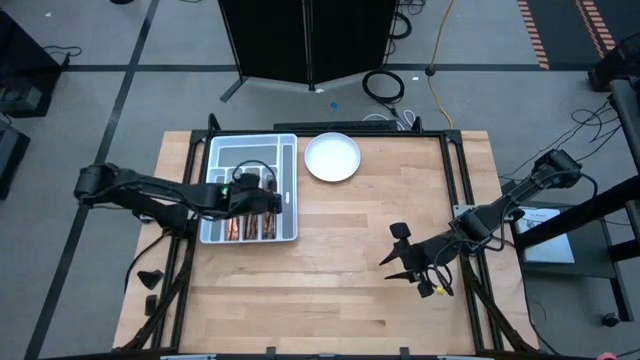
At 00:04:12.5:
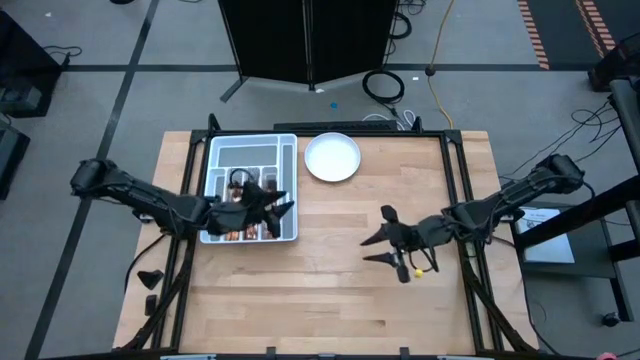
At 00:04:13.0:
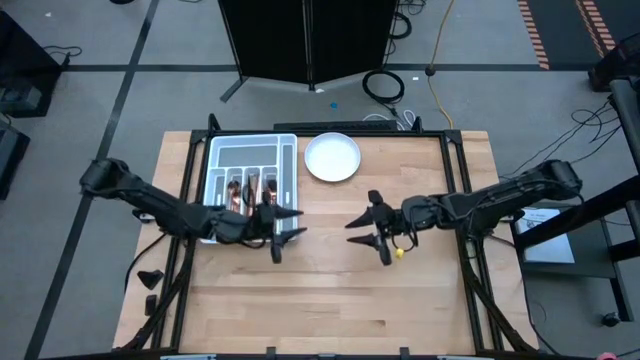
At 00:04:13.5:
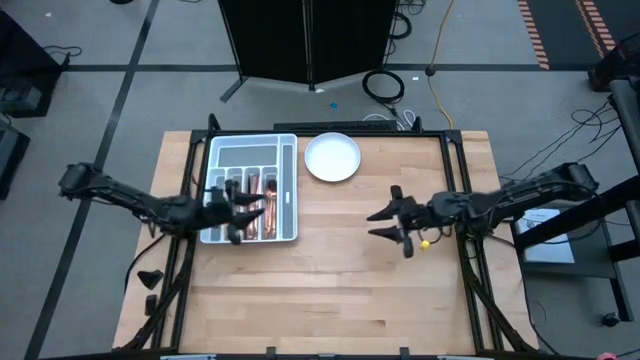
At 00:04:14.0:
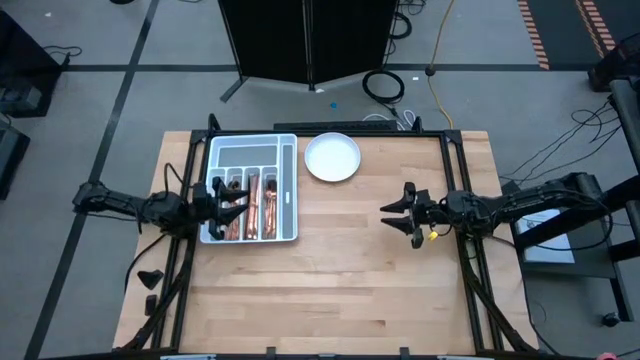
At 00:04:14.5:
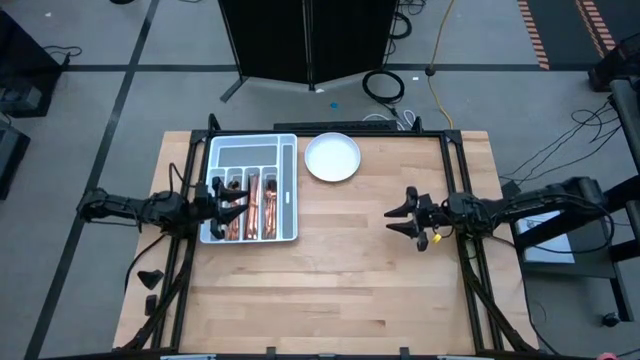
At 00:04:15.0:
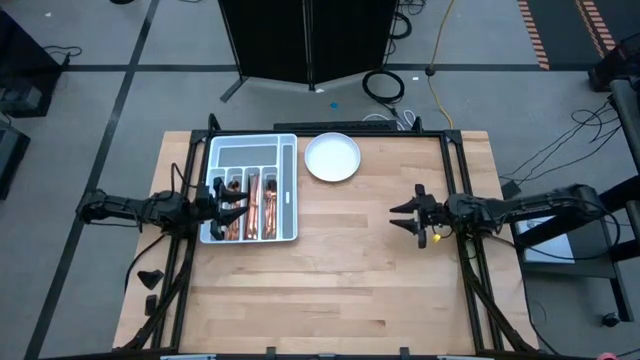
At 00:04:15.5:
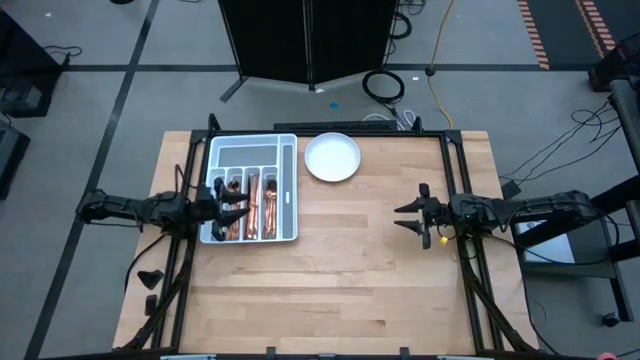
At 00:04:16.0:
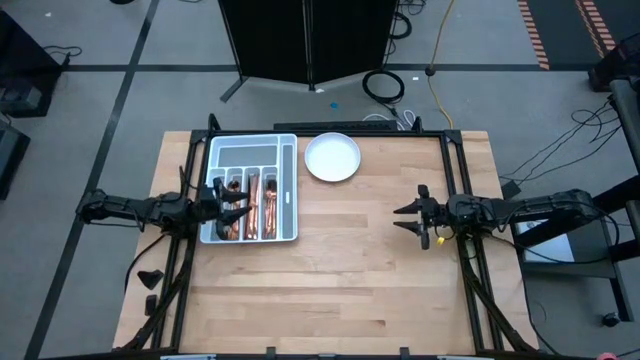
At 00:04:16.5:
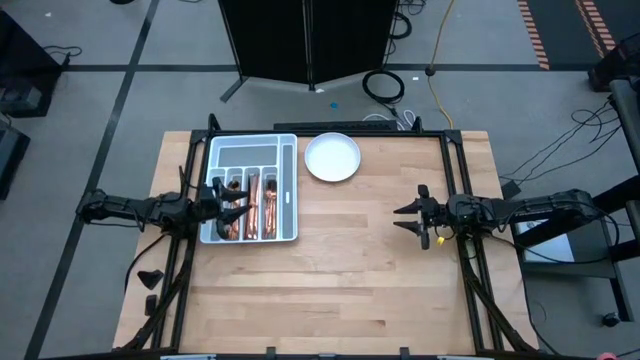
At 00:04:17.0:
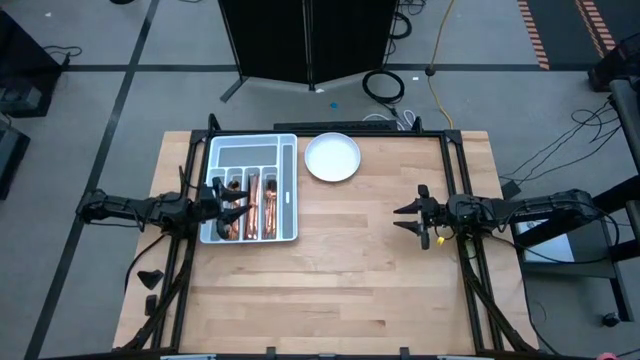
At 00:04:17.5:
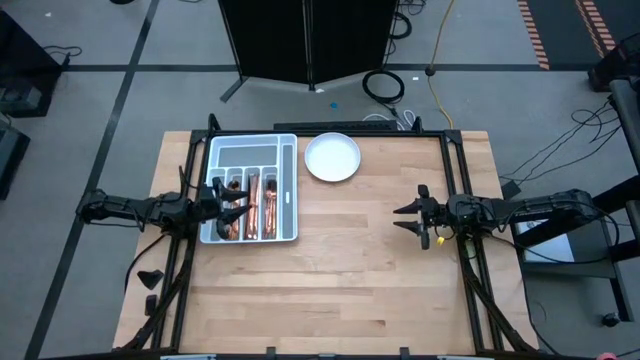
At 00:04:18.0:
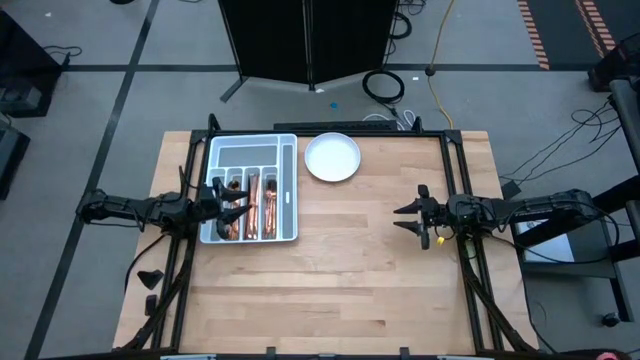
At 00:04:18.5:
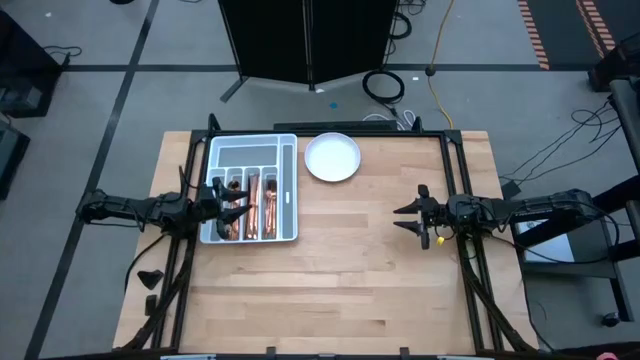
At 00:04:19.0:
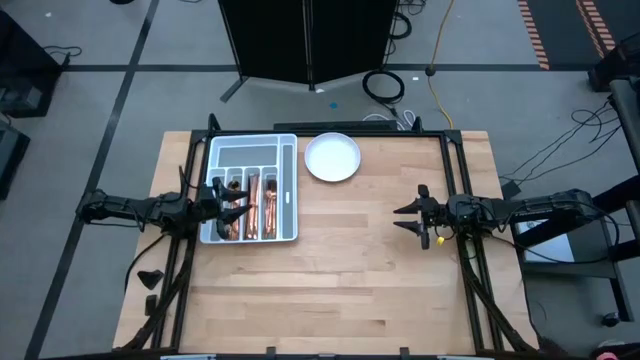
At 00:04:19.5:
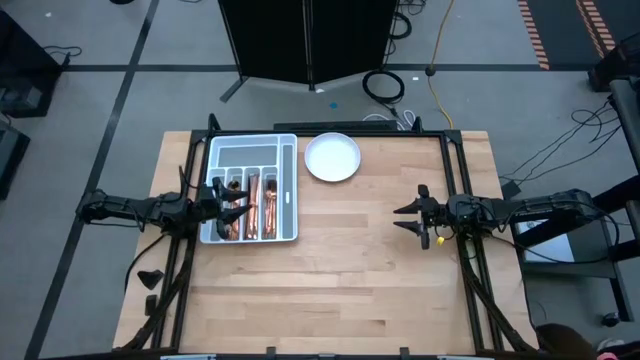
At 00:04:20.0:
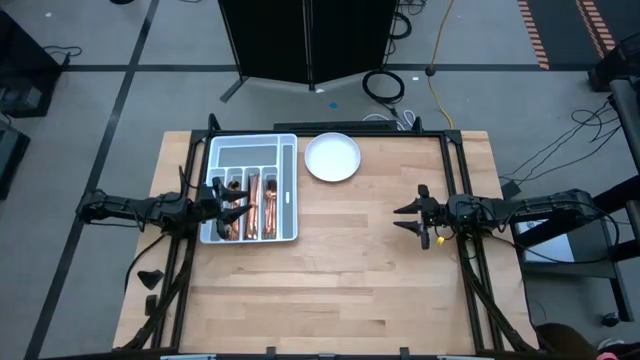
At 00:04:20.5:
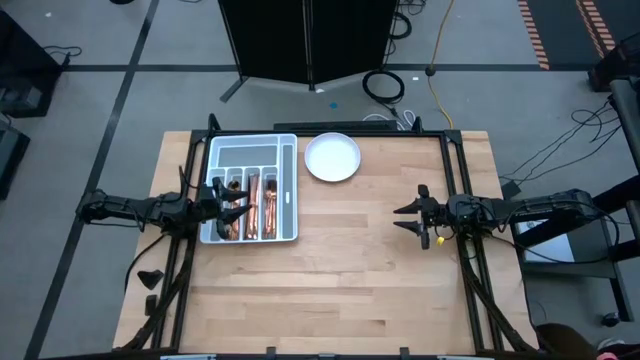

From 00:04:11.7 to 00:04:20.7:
Task: Sort silverware
Return to Home Position

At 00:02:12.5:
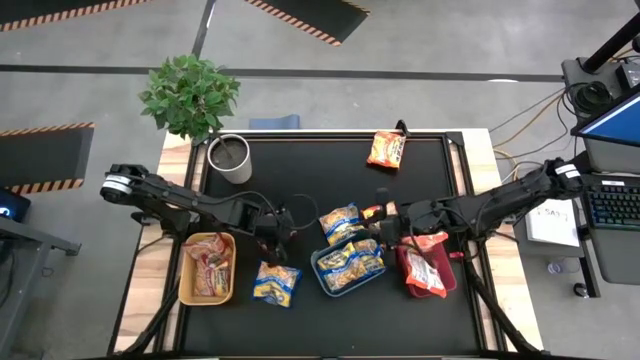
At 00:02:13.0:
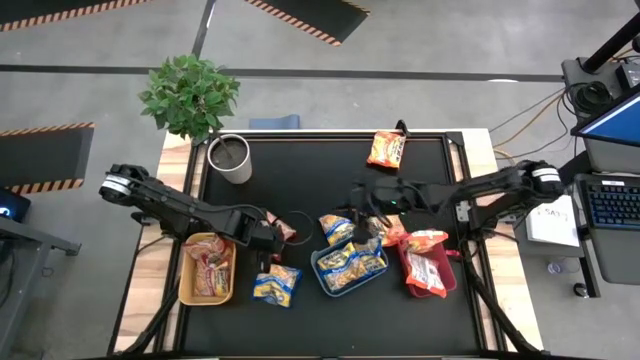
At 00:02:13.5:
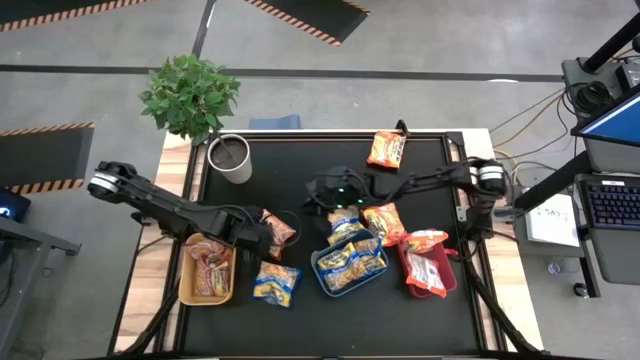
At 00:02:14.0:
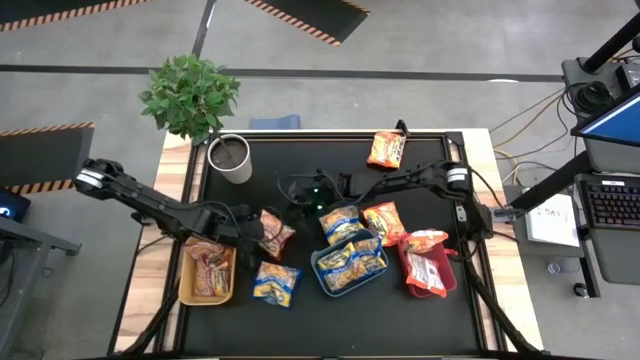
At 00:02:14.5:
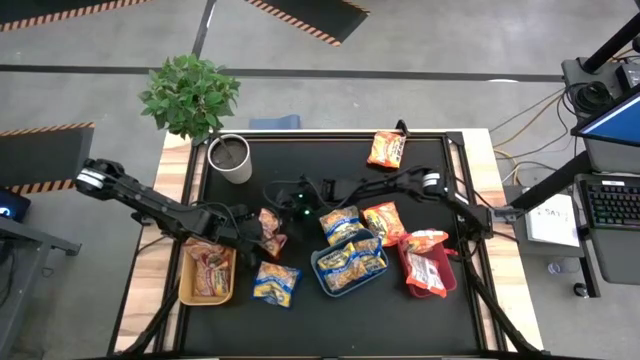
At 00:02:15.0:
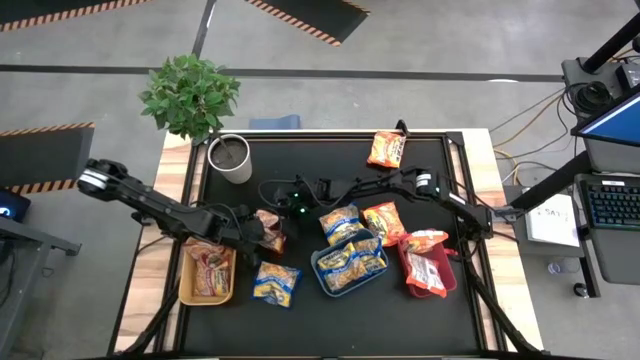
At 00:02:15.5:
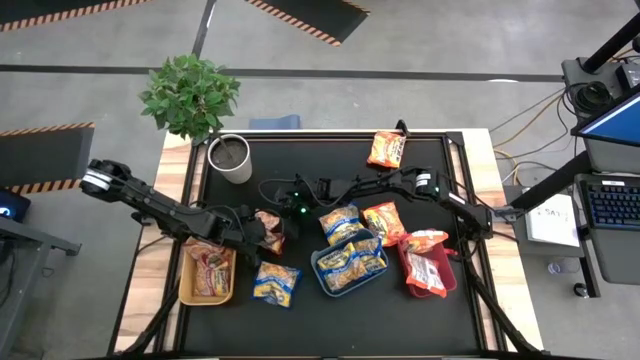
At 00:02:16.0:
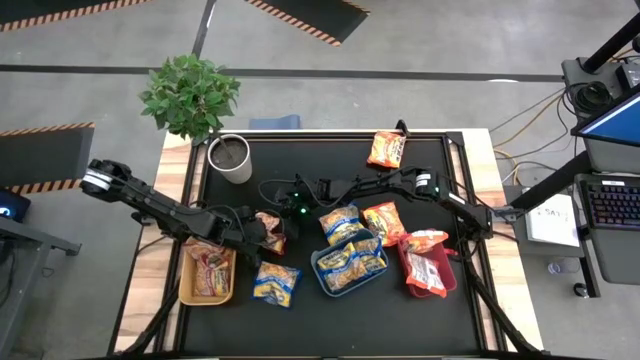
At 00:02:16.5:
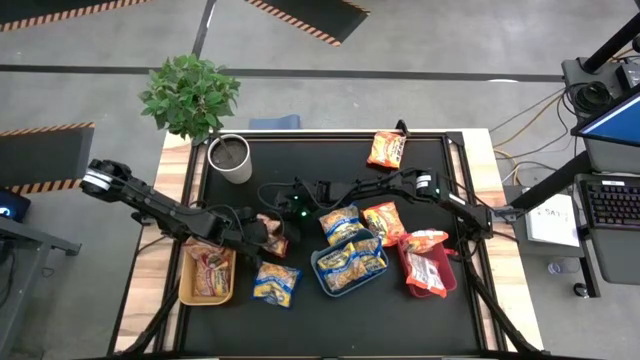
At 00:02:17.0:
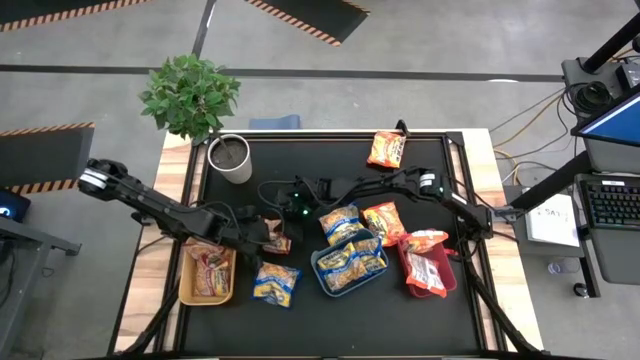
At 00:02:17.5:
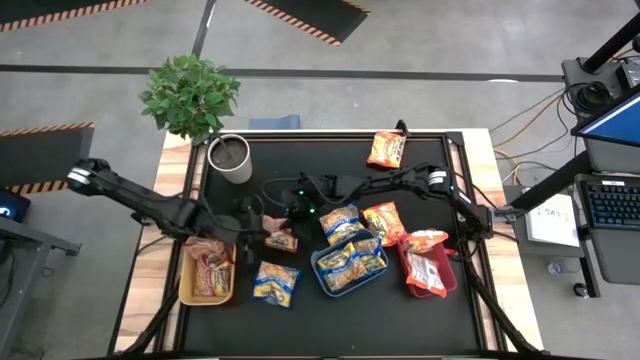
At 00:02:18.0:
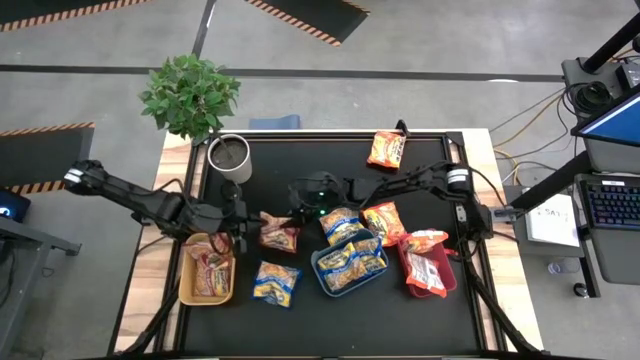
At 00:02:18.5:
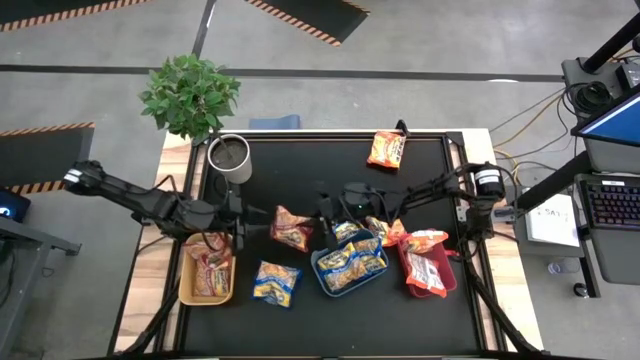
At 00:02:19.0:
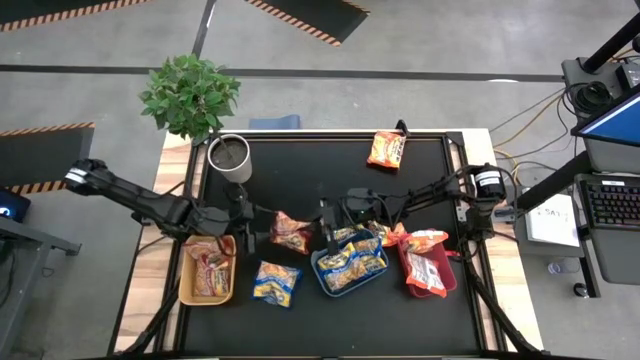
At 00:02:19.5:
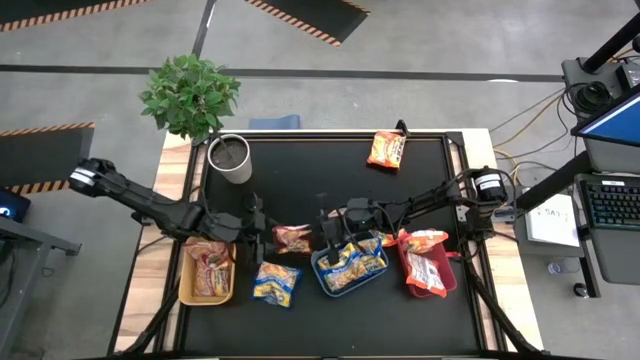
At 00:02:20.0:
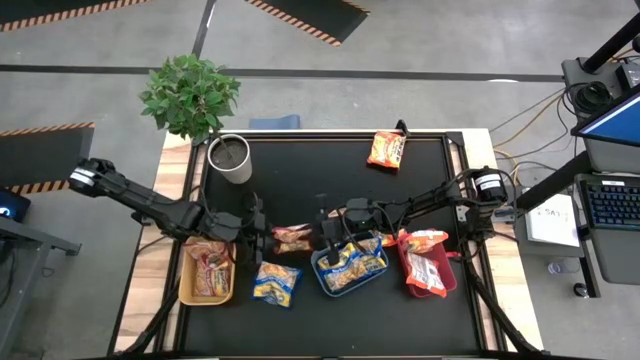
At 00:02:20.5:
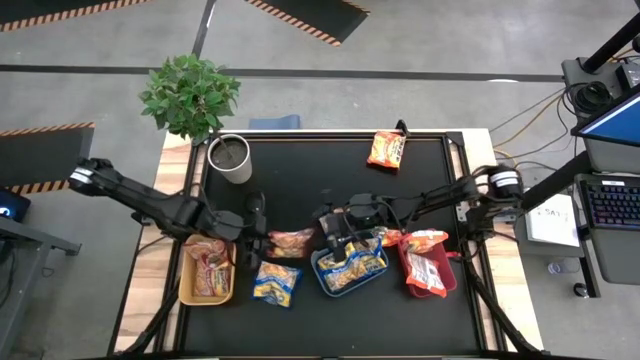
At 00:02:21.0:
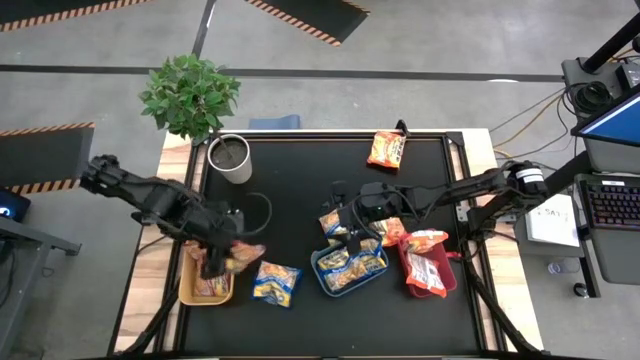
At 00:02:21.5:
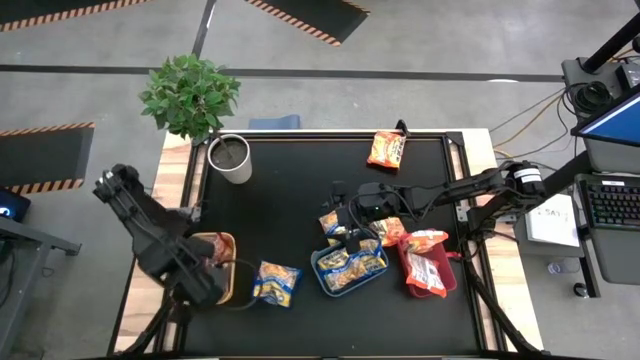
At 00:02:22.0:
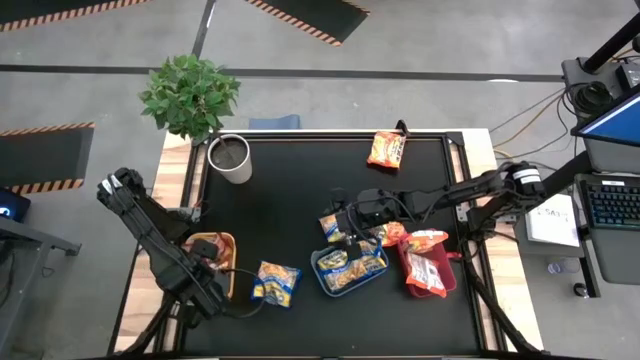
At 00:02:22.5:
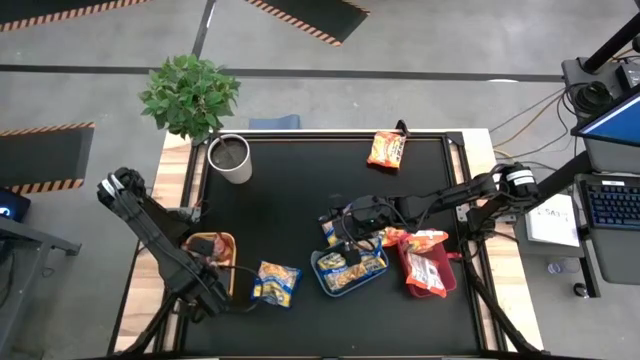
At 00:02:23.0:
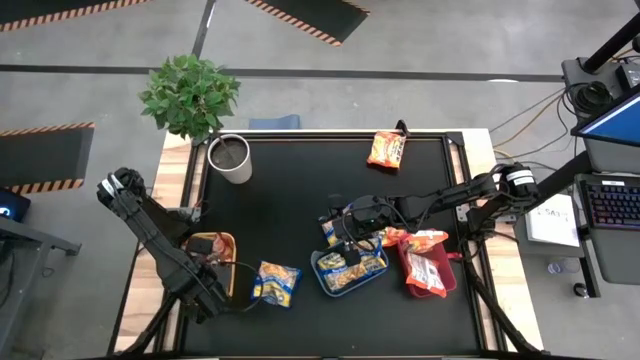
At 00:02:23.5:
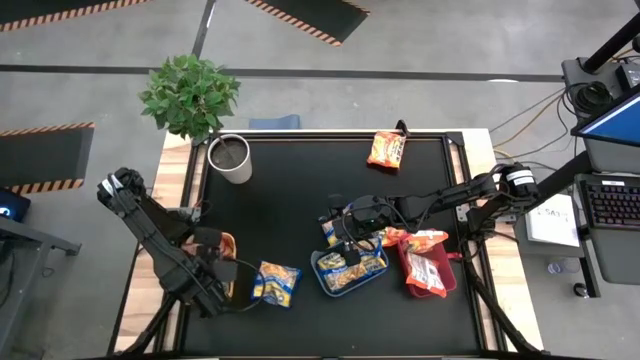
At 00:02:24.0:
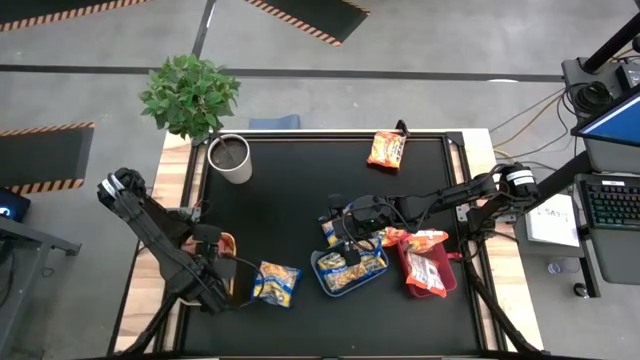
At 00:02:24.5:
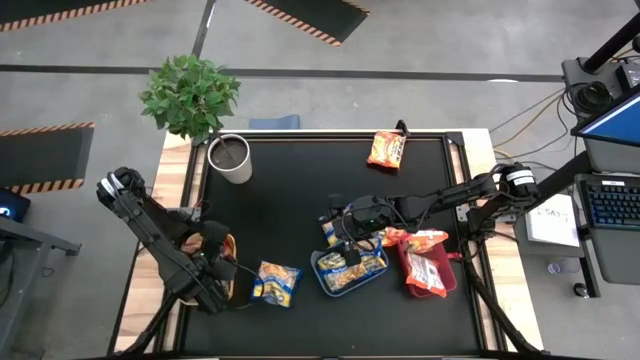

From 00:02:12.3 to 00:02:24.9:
Task: Sort Maruchan noodles
Put the red noodle pack into the yellow bin
